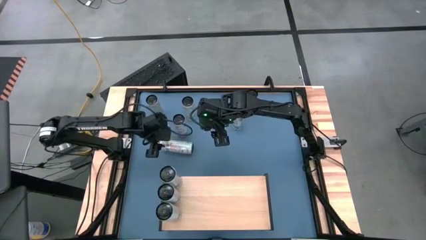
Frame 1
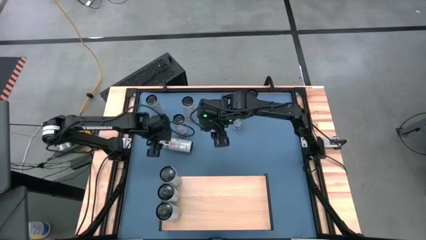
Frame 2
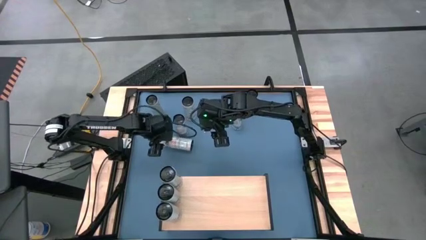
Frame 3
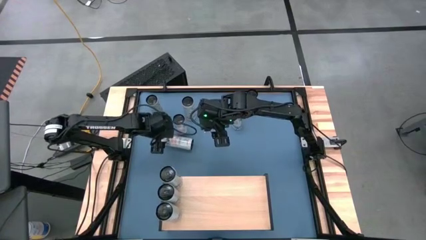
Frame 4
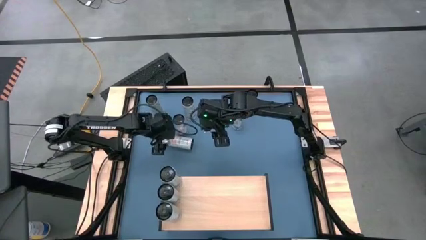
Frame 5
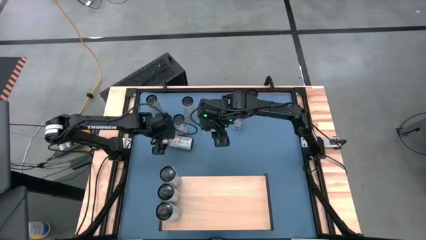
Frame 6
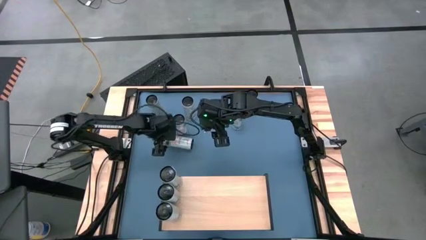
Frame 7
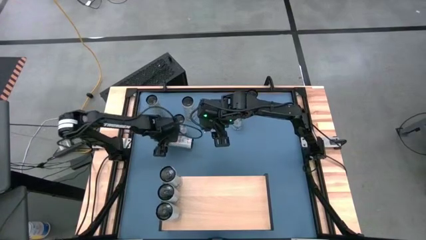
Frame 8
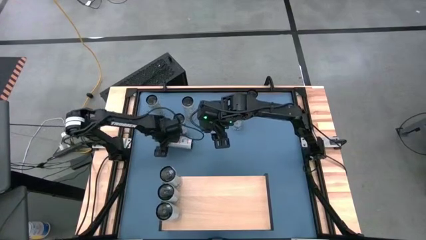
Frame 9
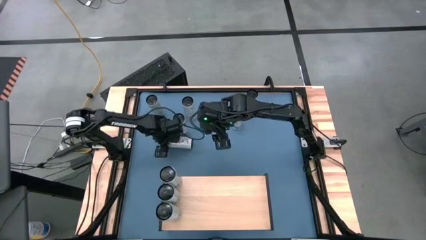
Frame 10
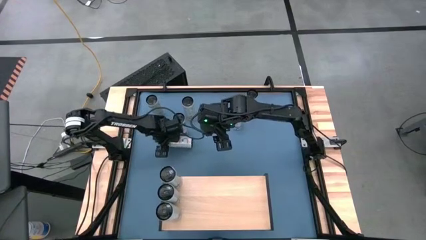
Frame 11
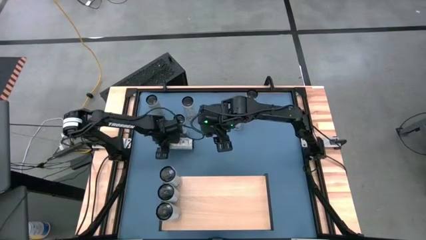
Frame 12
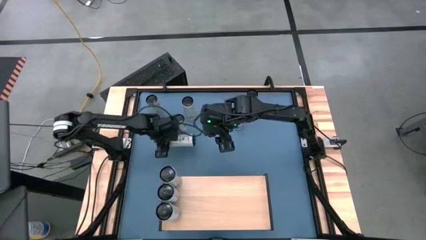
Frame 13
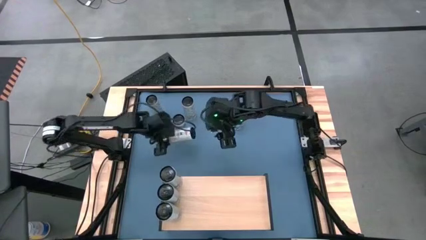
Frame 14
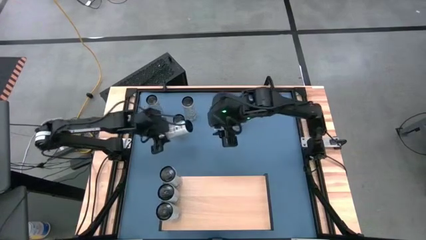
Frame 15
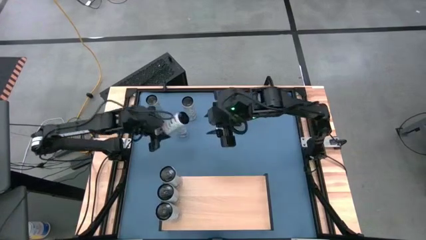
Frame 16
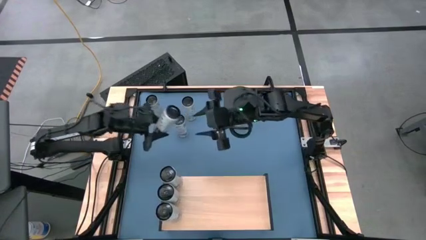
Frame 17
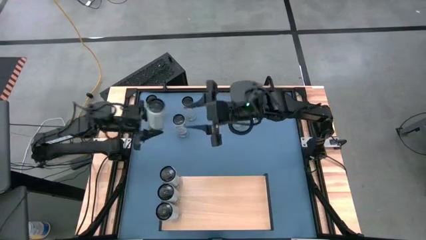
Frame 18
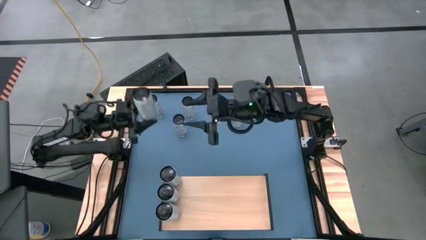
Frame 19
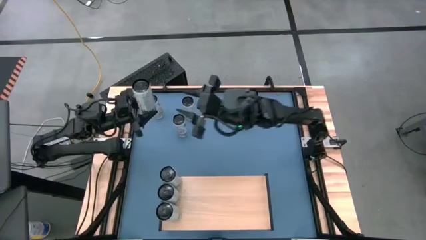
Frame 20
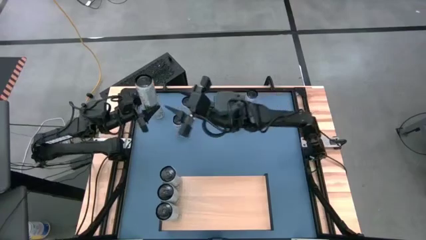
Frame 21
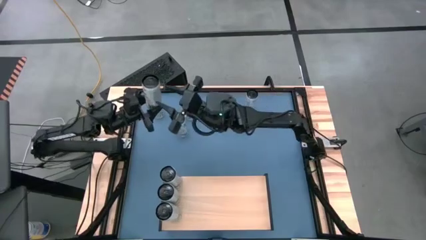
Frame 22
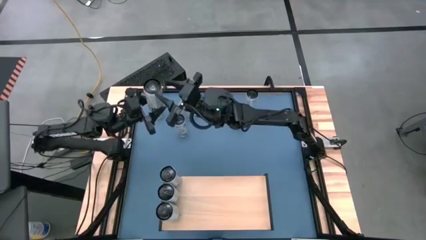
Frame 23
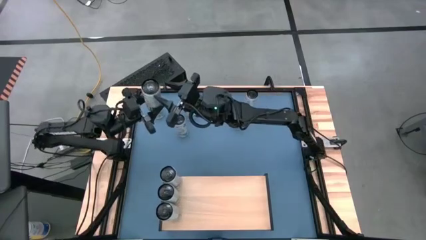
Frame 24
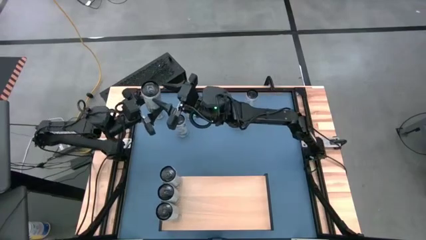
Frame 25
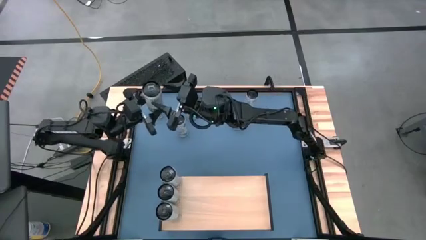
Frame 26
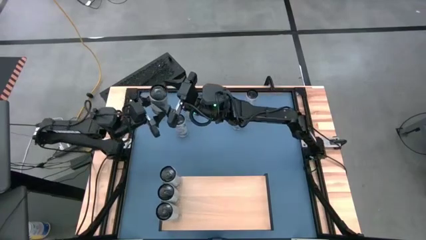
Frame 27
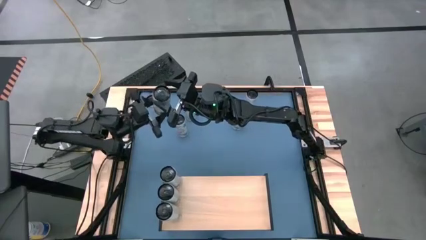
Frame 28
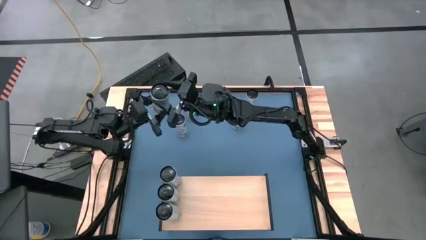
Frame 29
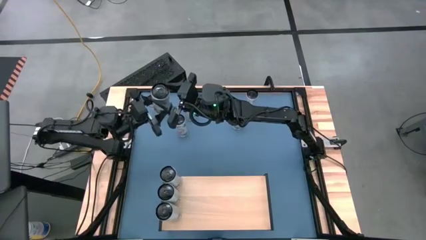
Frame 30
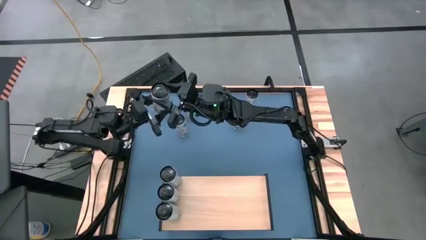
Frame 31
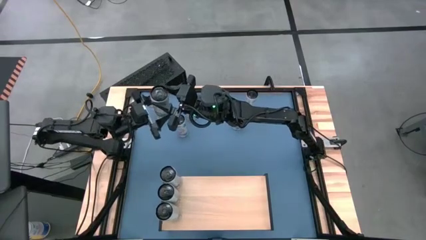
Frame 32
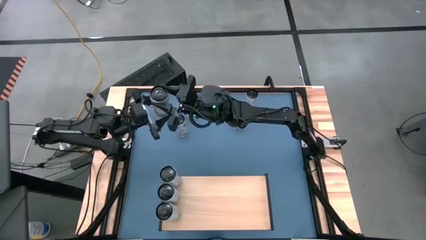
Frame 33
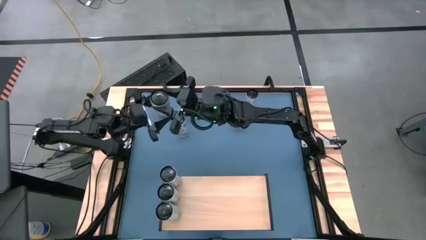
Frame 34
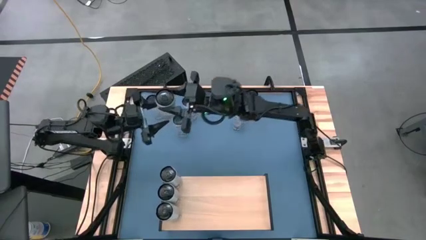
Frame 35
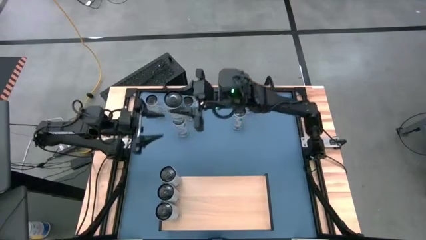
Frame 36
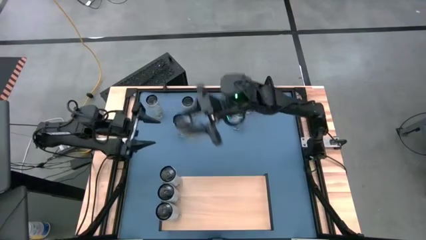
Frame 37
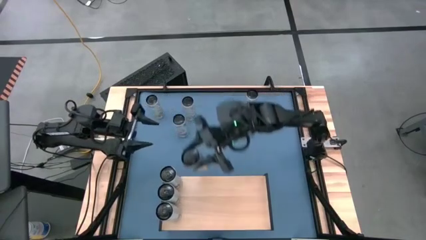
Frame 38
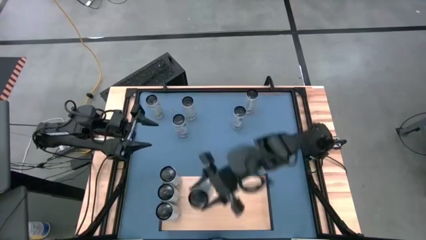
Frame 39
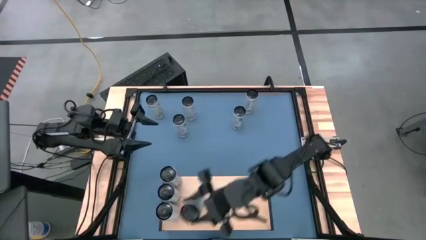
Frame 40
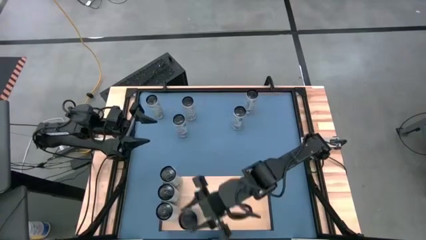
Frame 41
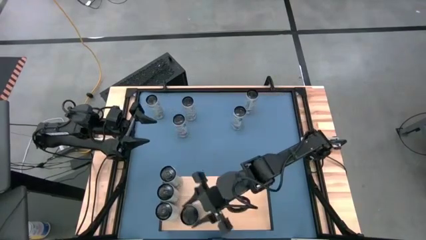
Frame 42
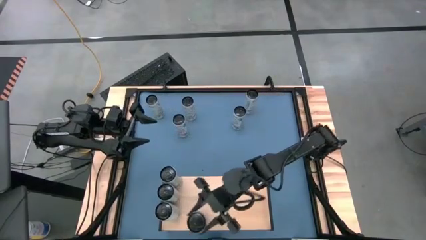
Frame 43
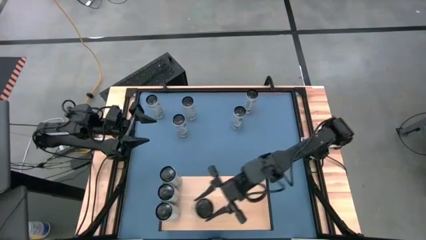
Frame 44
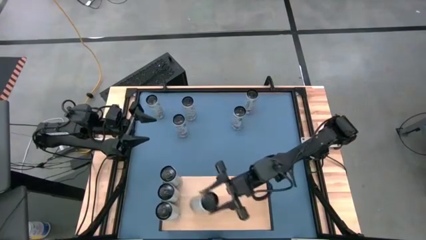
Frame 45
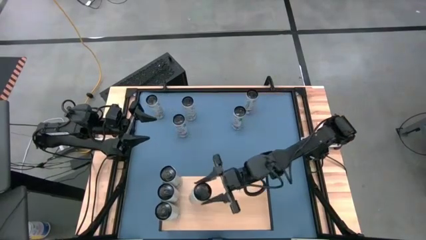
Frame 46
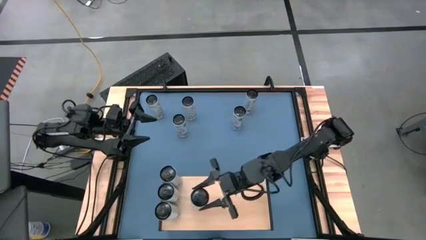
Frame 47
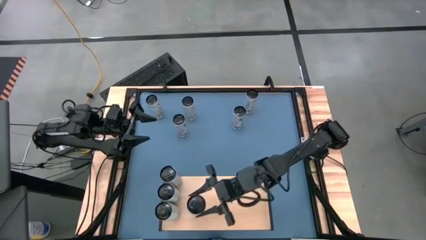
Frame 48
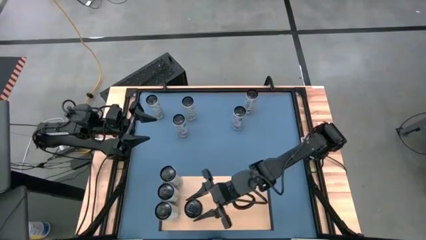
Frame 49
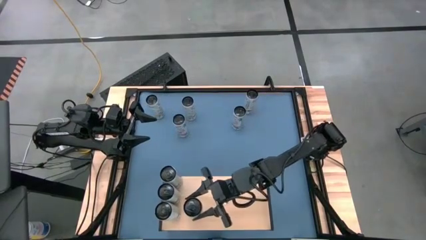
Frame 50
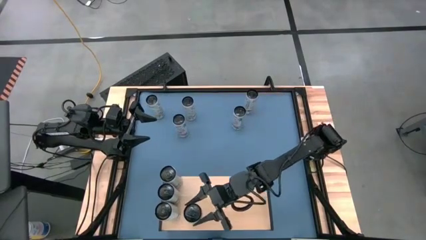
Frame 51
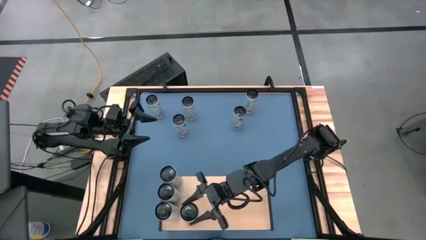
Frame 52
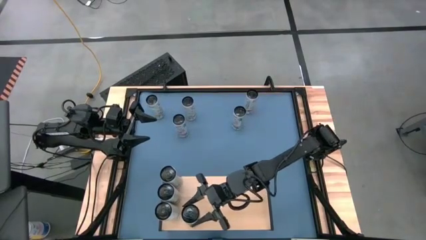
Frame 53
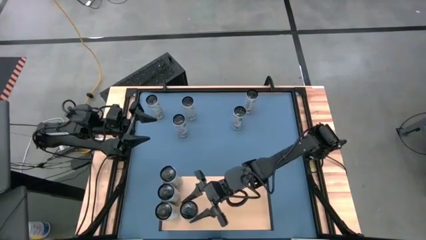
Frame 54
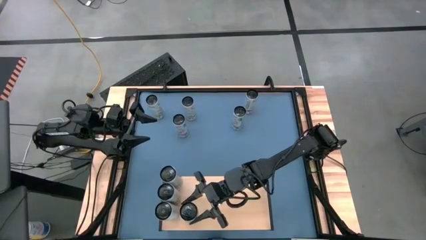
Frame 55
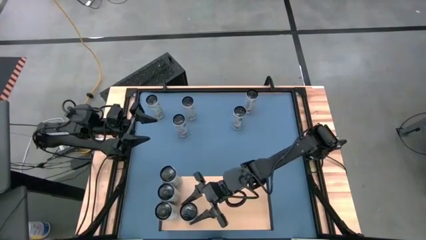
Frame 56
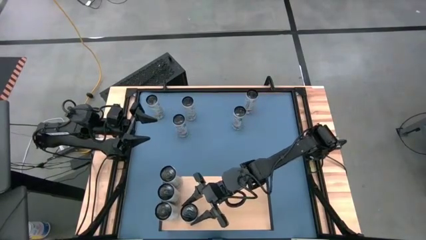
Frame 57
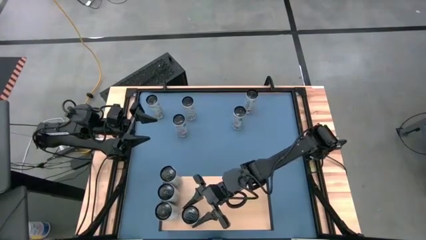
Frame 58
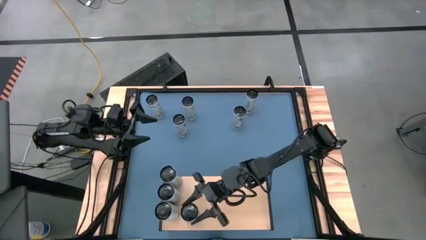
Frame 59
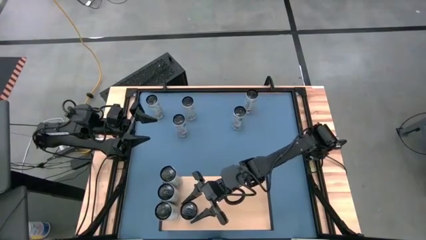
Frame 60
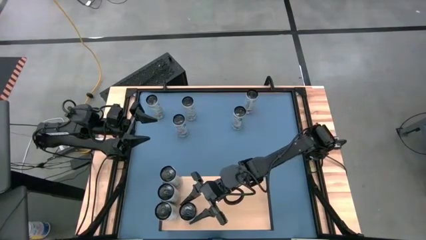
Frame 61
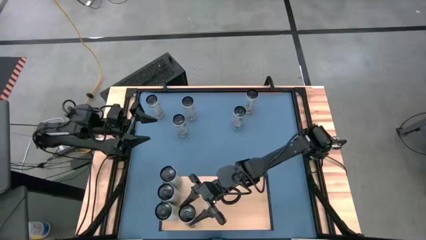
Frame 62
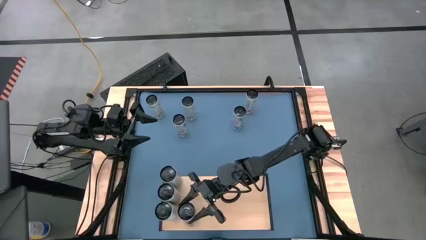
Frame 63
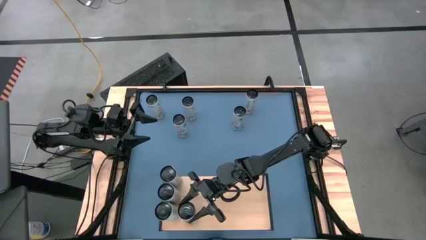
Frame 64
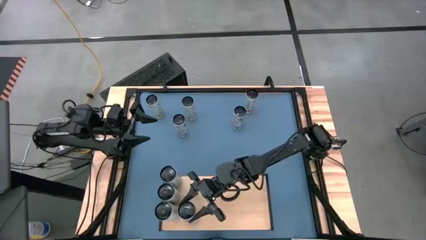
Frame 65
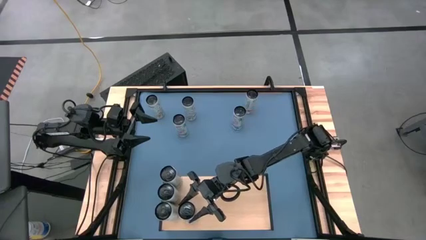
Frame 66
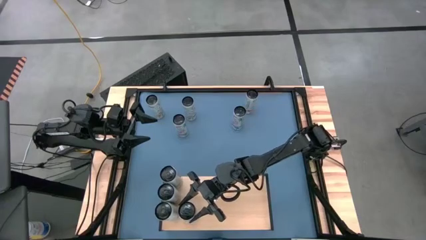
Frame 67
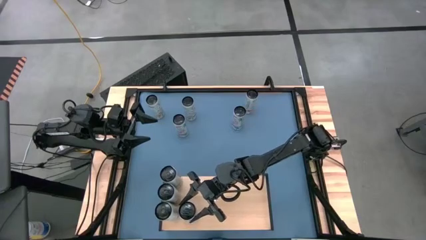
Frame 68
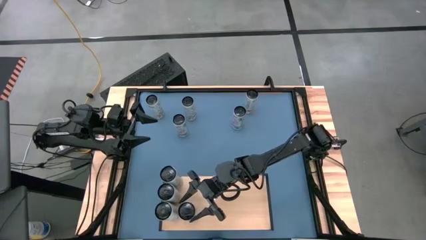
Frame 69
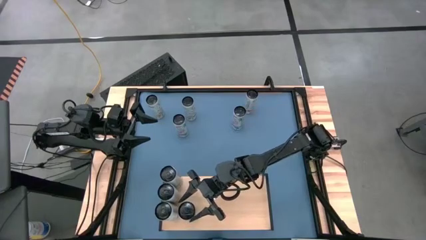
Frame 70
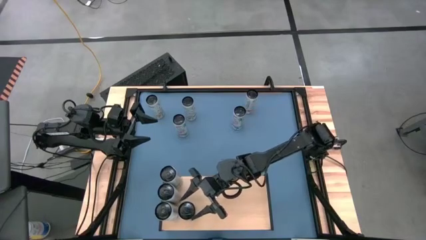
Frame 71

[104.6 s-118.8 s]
Task: Place canned beverage on shelf
Put the bottom right white yellow soda can on the shelf

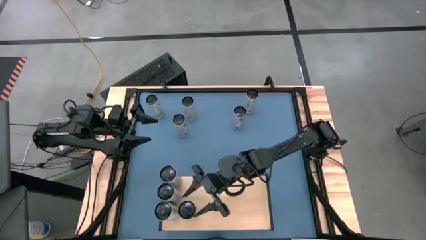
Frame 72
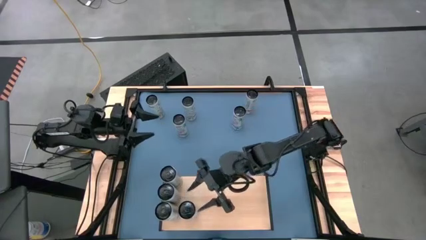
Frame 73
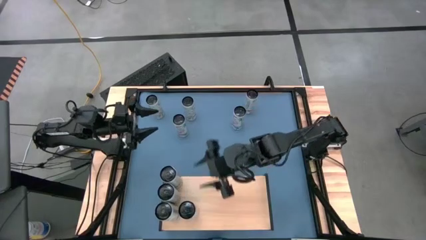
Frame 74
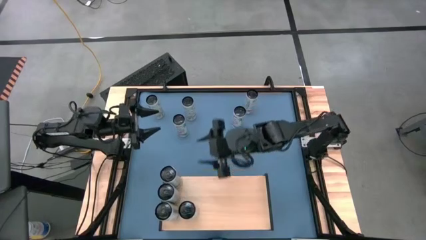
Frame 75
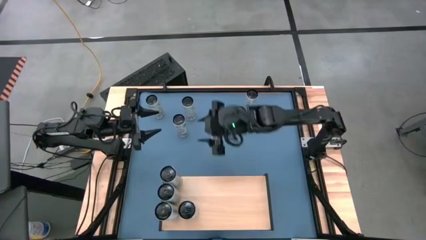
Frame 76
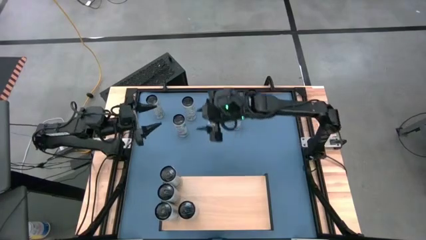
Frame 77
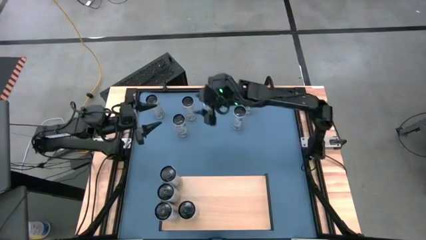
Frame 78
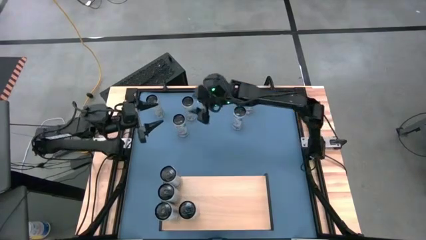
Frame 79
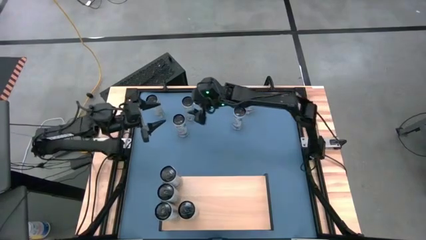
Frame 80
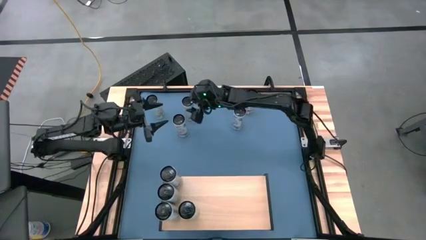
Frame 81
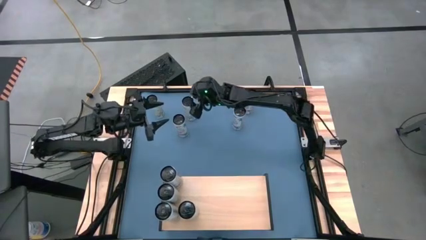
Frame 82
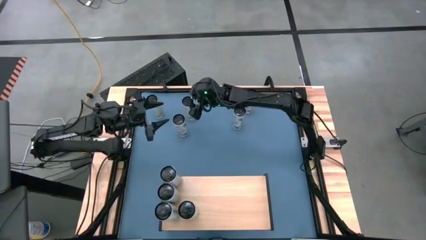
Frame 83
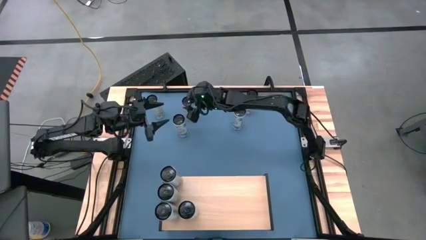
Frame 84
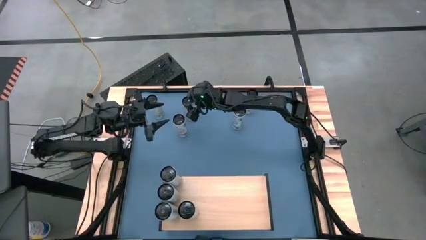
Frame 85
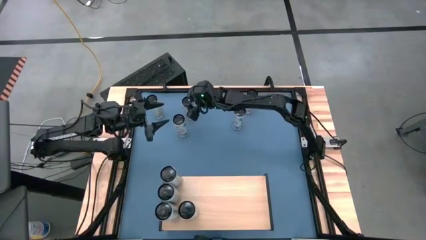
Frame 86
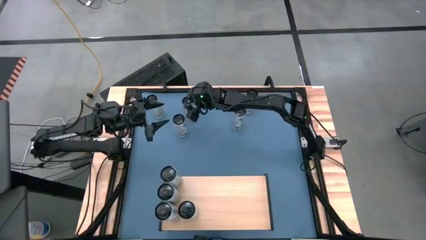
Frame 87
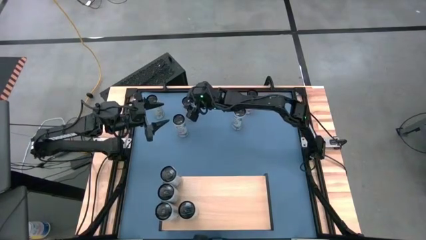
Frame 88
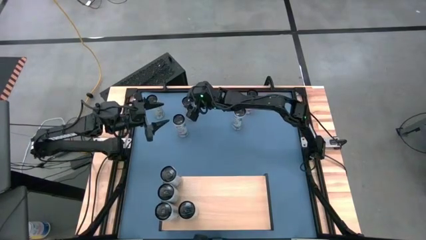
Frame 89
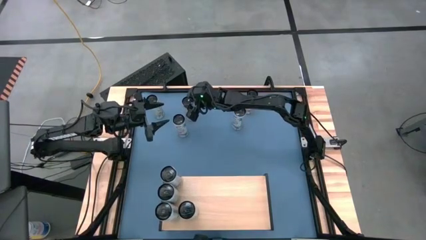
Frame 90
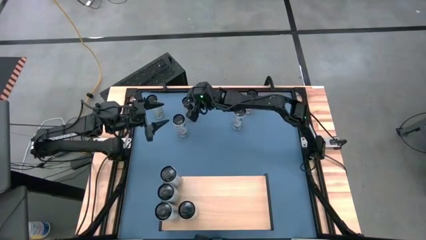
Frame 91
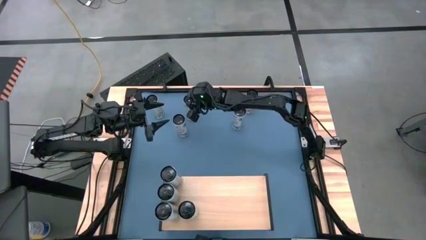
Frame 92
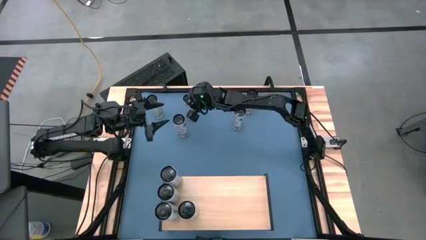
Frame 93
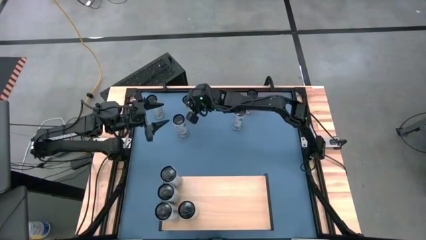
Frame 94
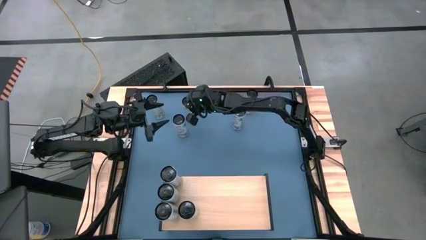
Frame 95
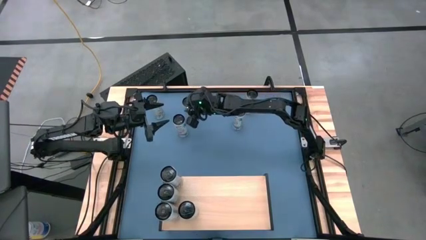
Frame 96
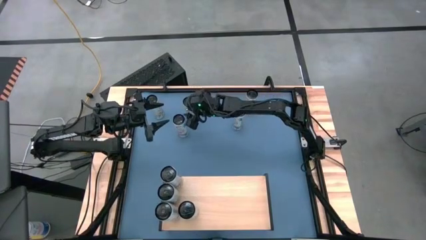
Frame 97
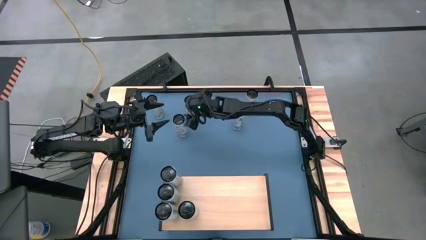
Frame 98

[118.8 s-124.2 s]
Put the right white yellow soda can on the shelf aligned with the other white yellow soda can
